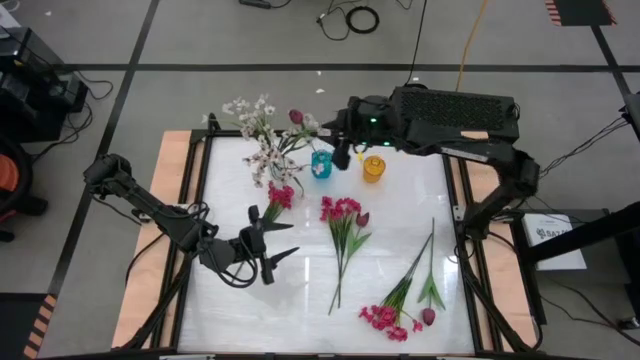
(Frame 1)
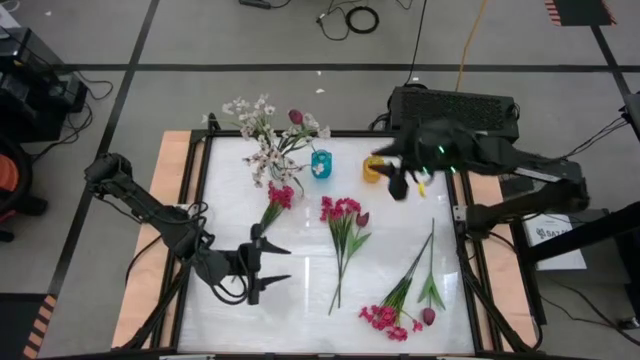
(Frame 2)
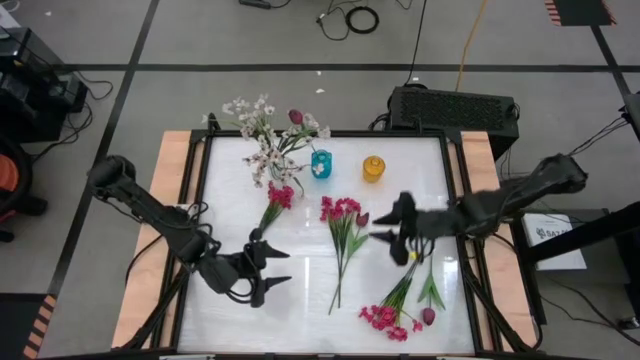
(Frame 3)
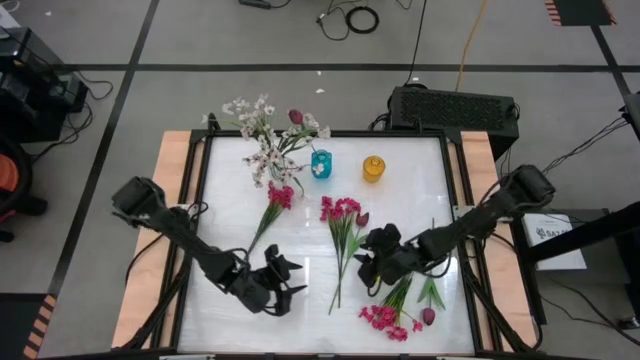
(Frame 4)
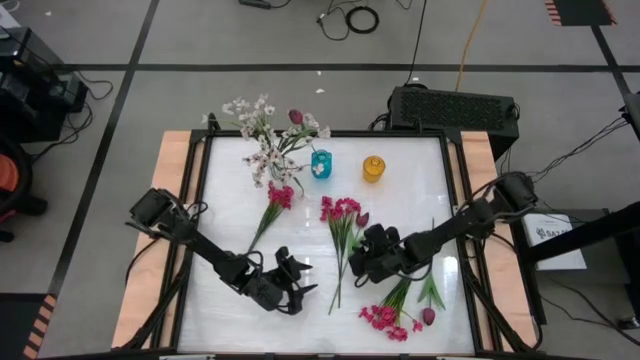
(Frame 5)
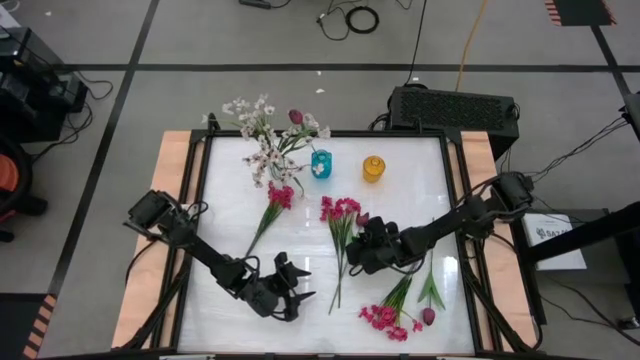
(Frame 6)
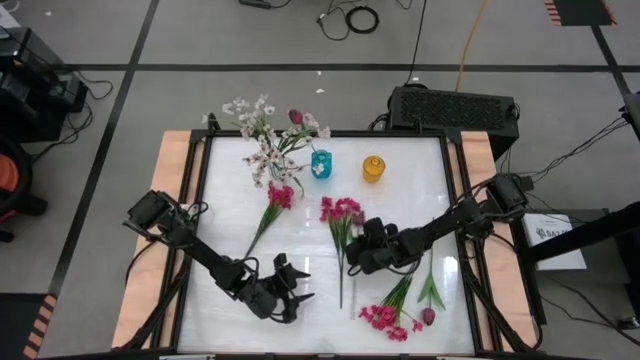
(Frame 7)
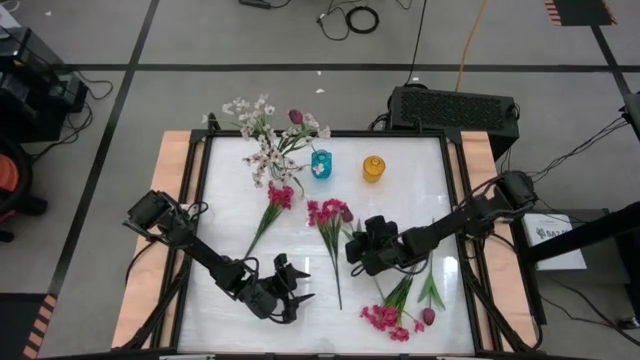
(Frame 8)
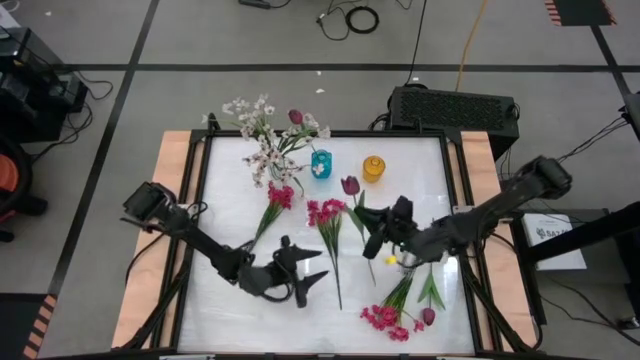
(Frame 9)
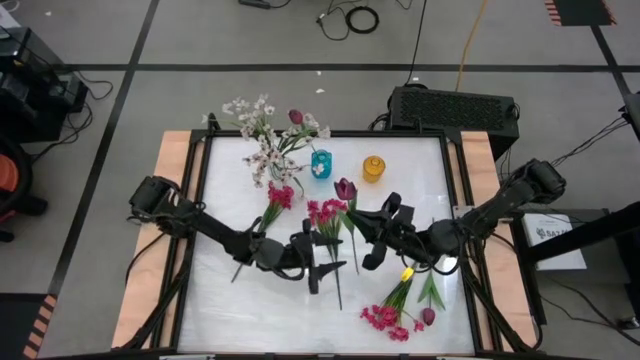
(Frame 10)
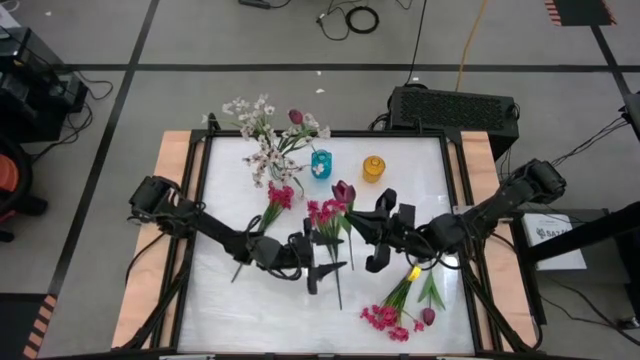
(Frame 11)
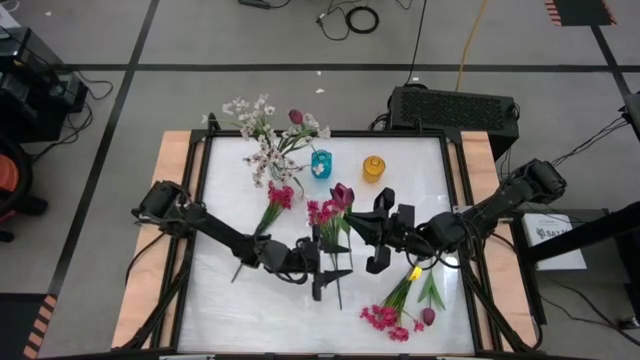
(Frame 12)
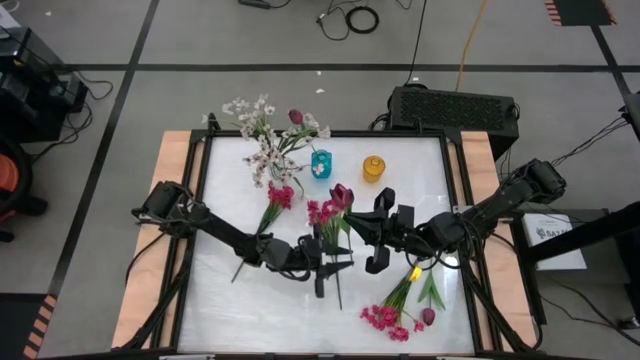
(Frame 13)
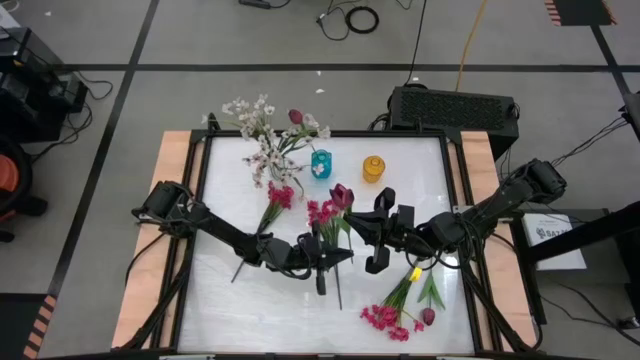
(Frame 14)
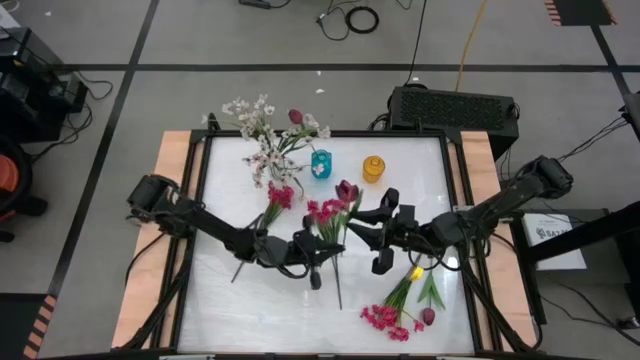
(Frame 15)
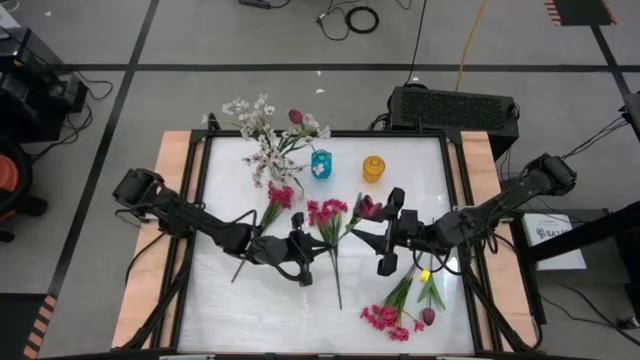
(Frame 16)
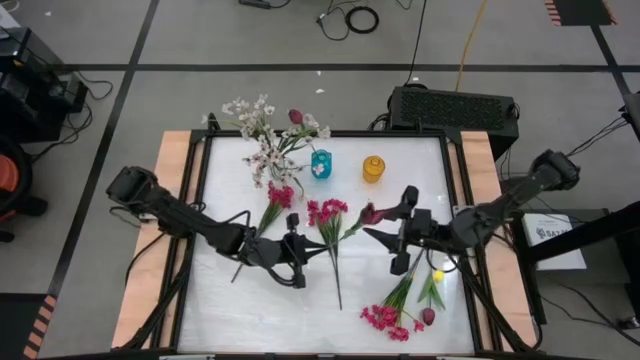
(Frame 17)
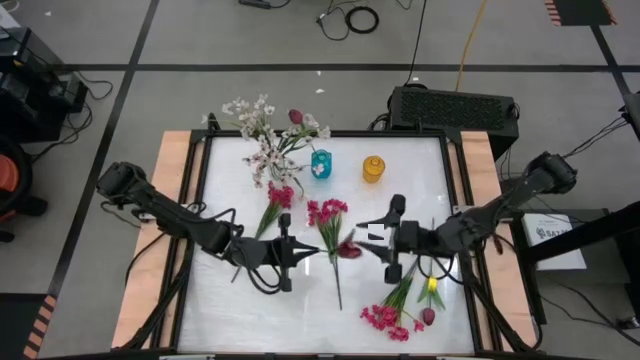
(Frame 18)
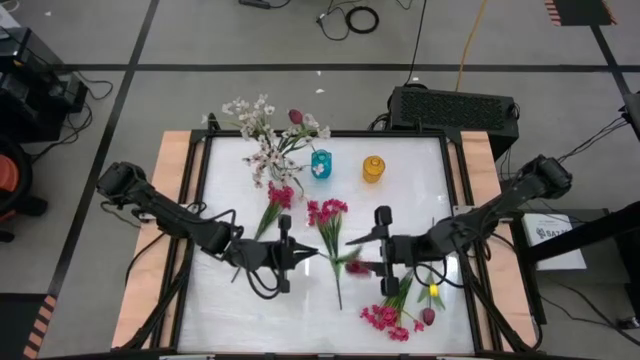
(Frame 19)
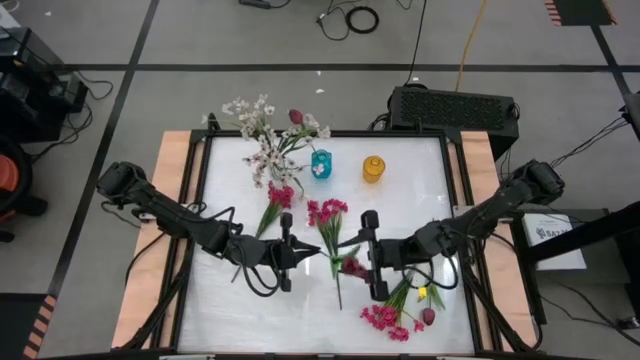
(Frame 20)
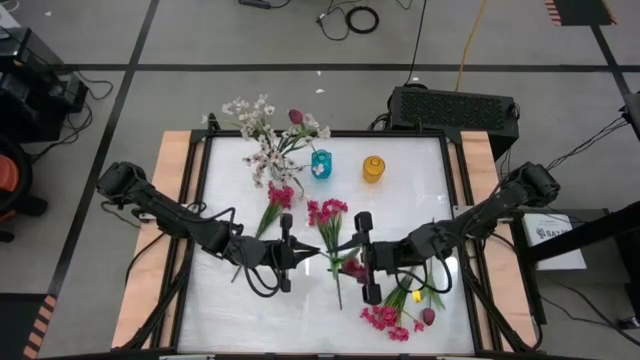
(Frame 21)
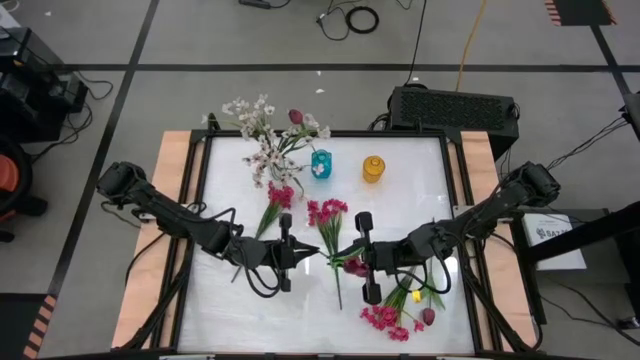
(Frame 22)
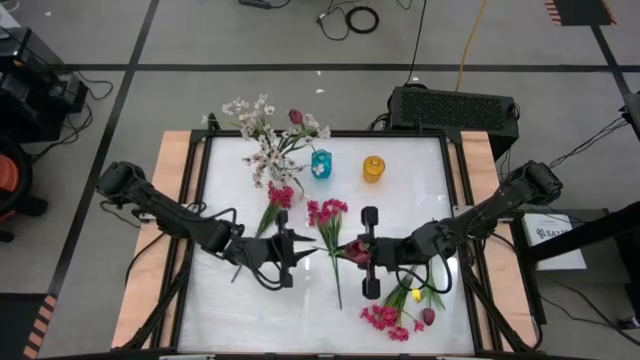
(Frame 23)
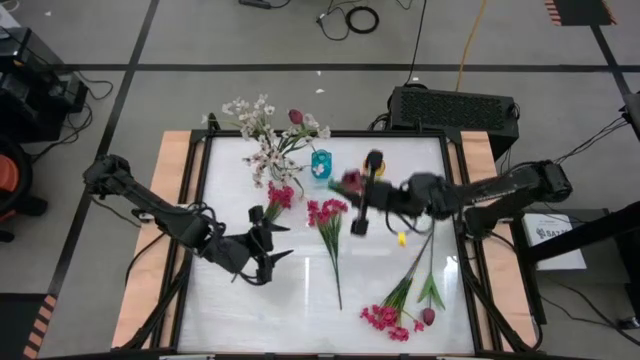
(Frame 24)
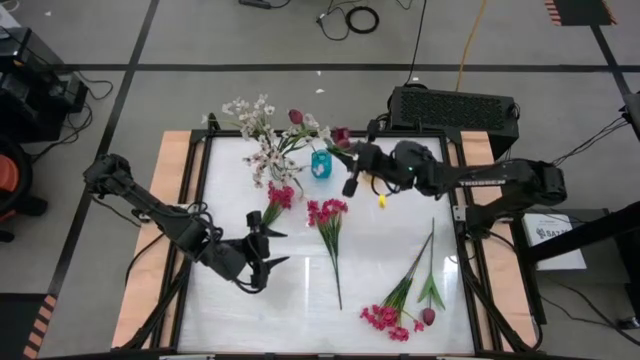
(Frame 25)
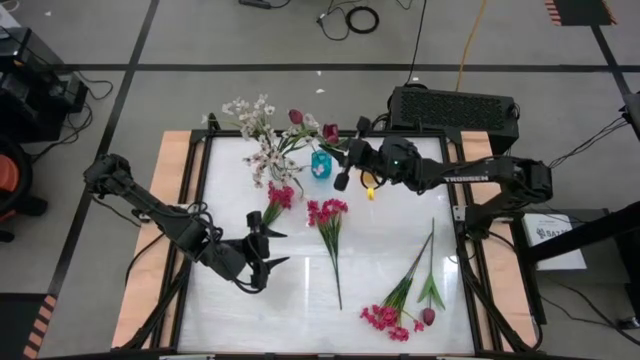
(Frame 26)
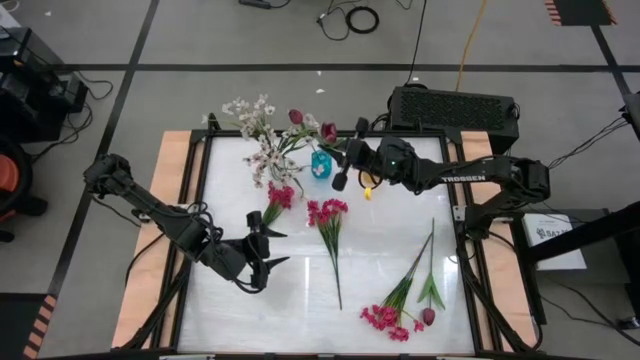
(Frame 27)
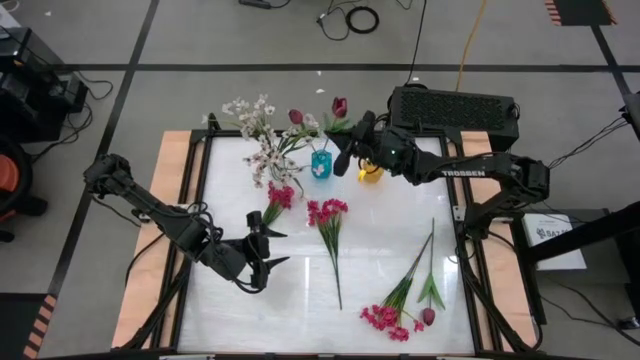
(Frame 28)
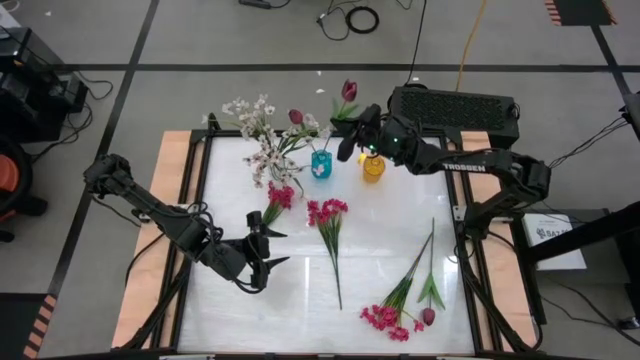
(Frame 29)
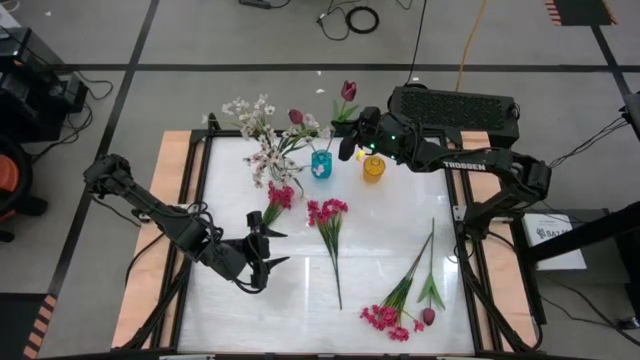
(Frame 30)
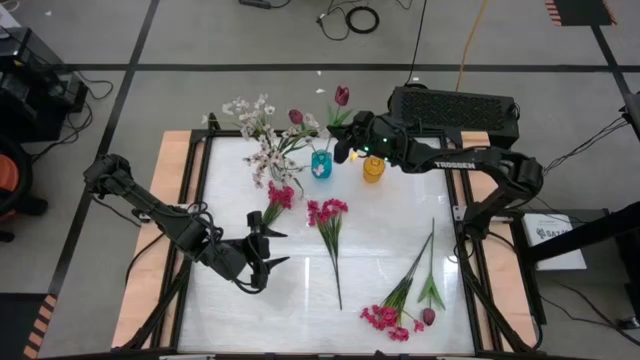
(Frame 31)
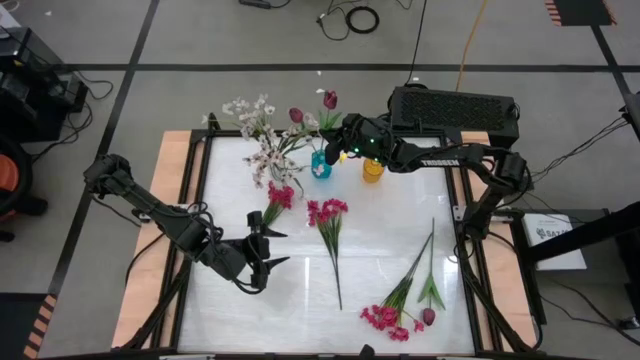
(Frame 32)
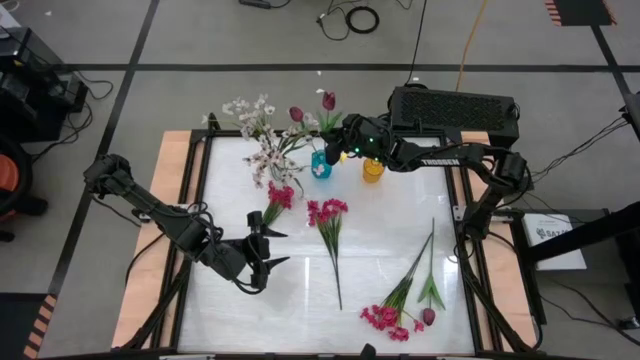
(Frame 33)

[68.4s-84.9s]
Task: Sort flowers into vase by color
Put the top red tulip into the blue vase

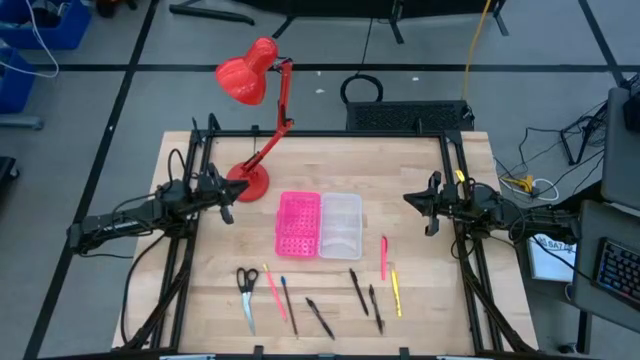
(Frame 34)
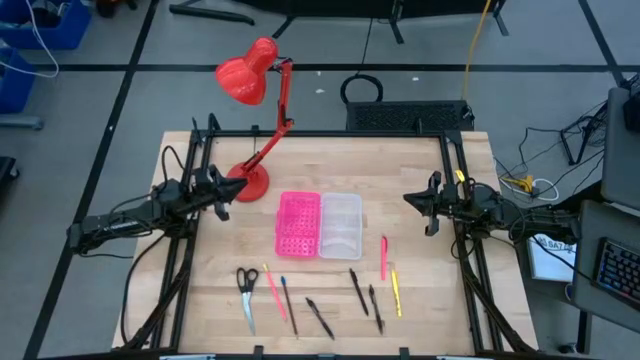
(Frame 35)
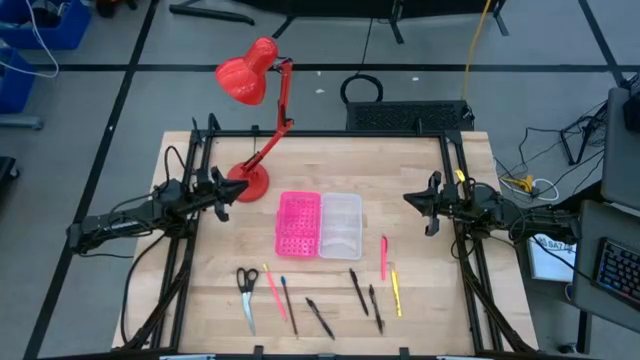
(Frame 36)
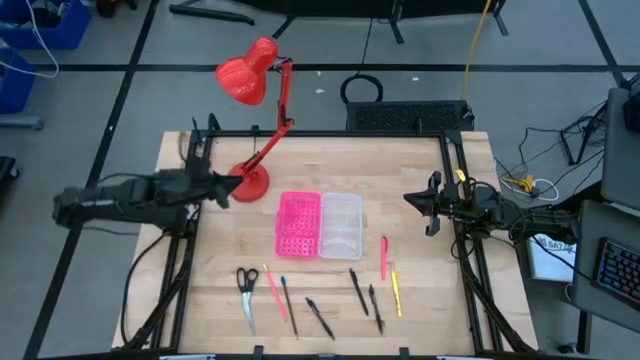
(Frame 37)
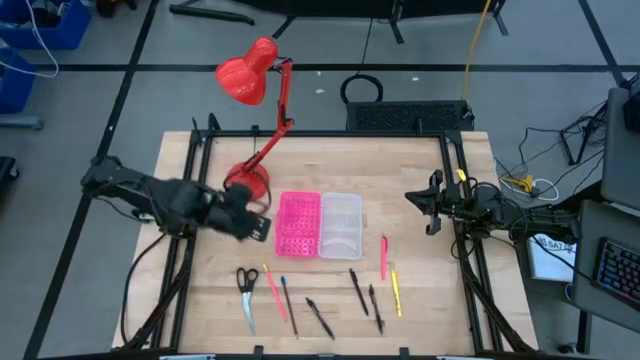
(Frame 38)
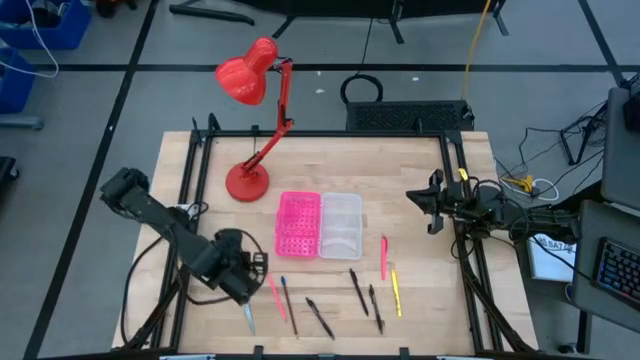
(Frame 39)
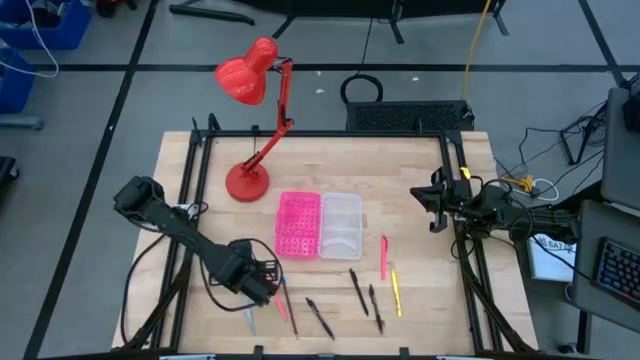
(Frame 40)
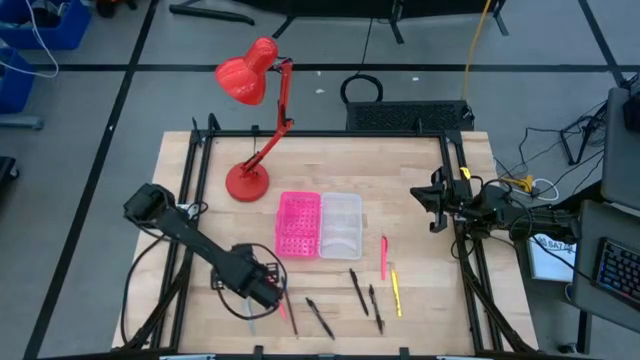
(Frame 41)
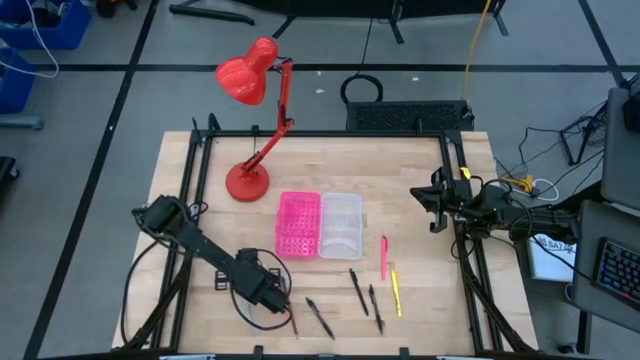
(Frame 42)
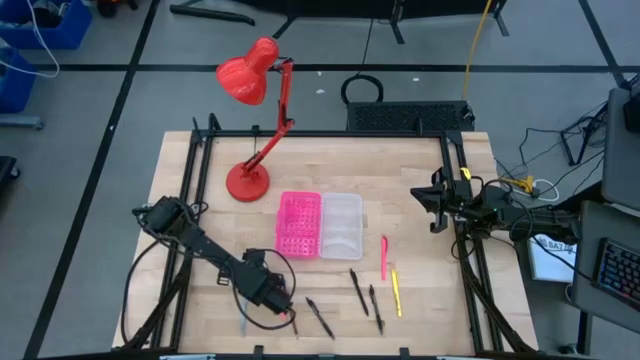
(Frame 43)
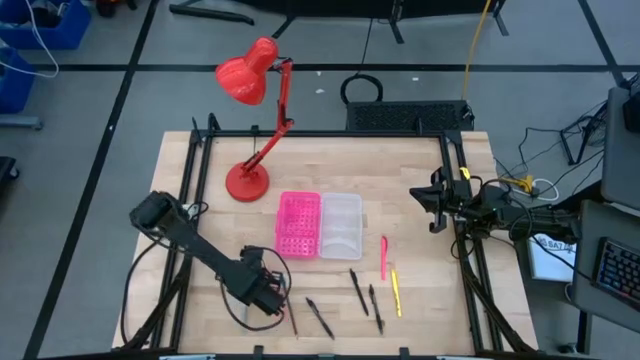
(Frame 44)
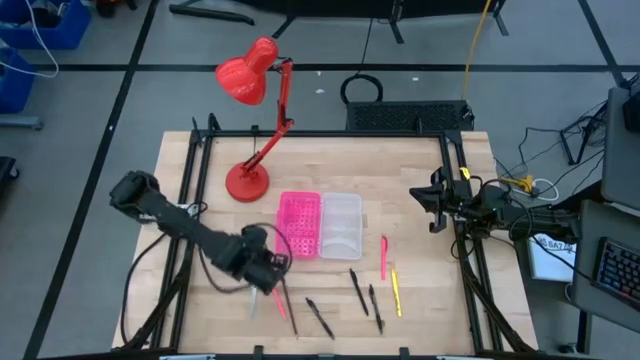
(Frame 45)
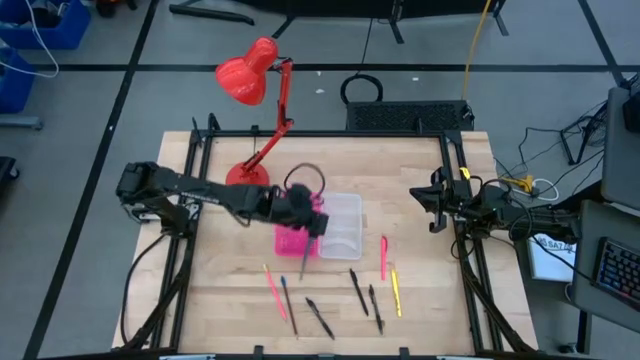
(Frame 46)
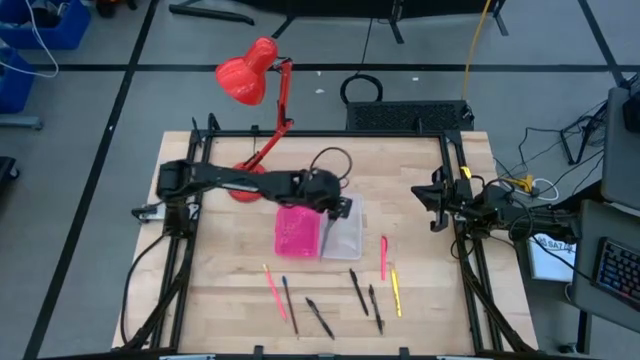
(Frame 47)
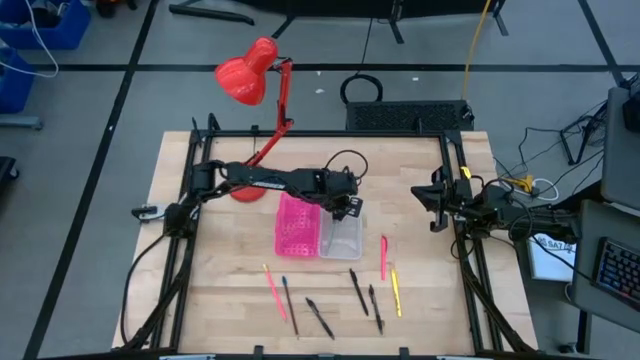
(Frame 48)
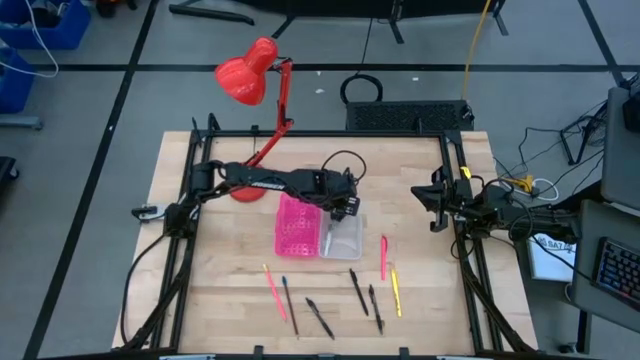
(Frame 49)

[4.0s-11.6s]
Task: Pick & place school supplies into a supply box
Put the scissors into the supply box
